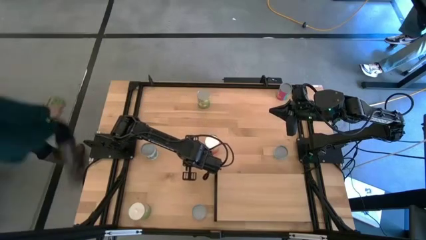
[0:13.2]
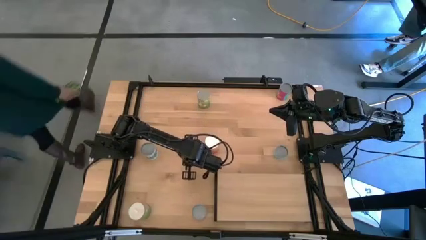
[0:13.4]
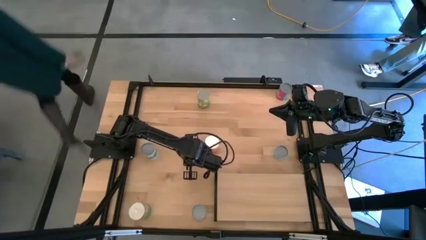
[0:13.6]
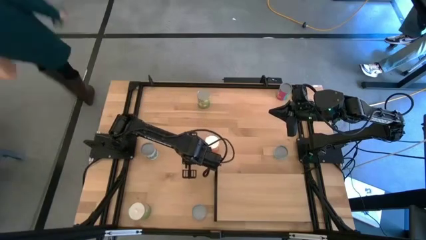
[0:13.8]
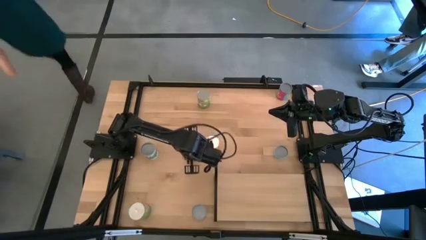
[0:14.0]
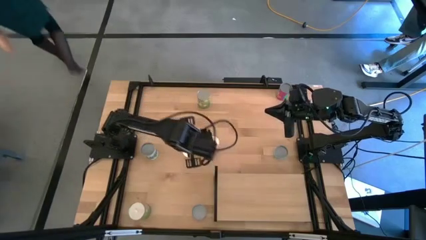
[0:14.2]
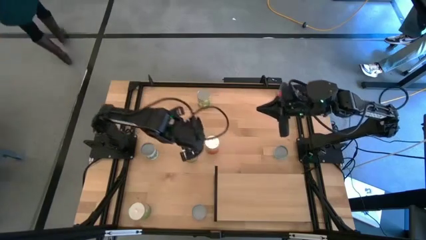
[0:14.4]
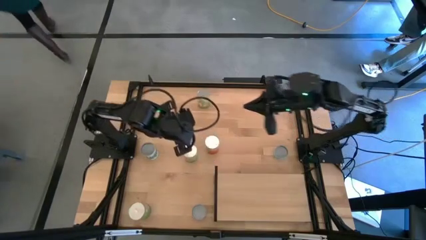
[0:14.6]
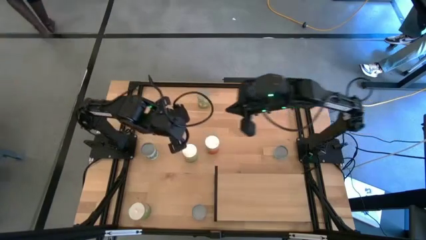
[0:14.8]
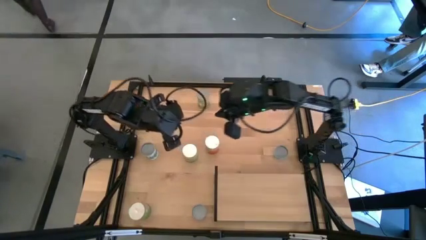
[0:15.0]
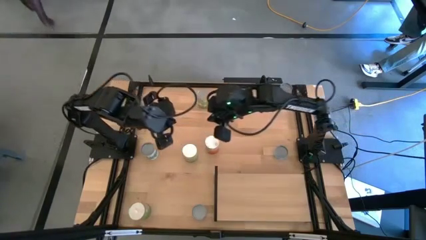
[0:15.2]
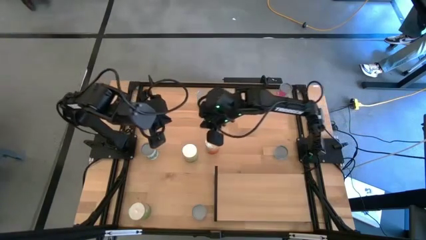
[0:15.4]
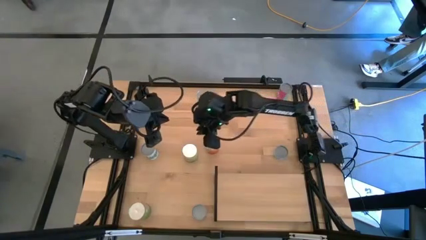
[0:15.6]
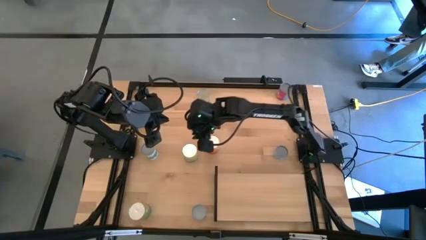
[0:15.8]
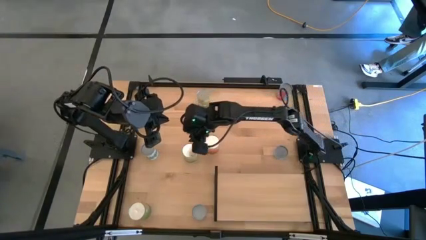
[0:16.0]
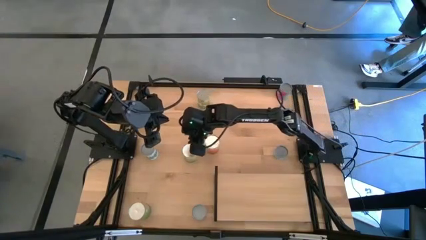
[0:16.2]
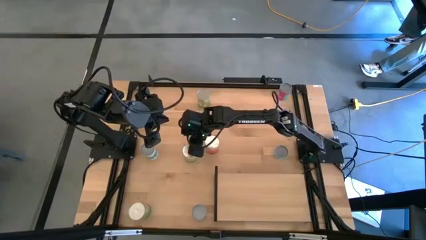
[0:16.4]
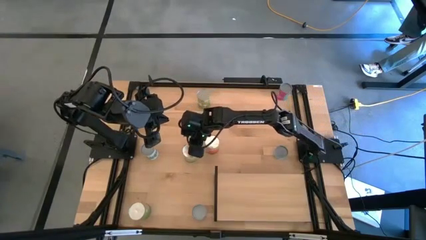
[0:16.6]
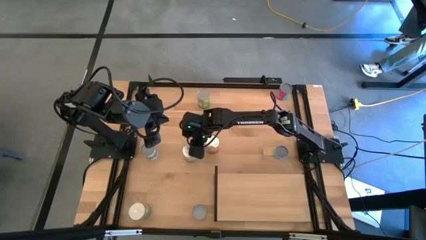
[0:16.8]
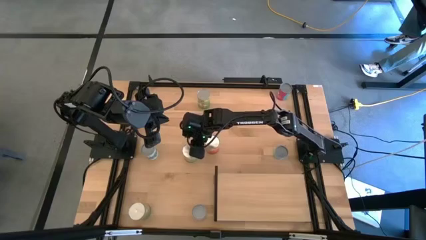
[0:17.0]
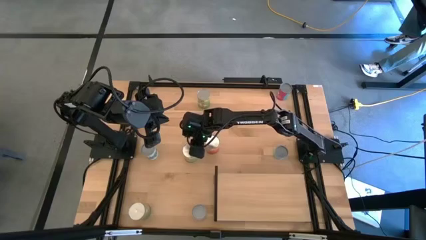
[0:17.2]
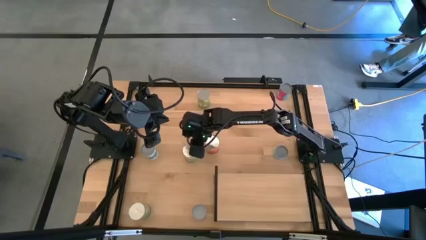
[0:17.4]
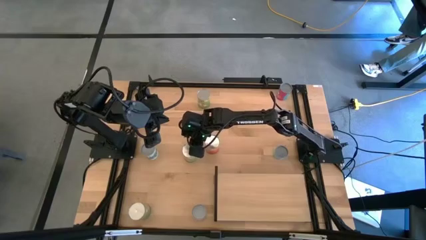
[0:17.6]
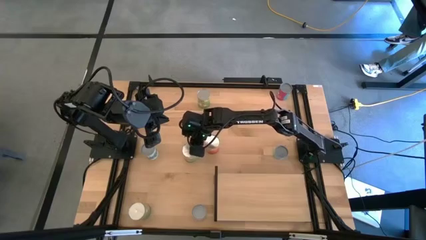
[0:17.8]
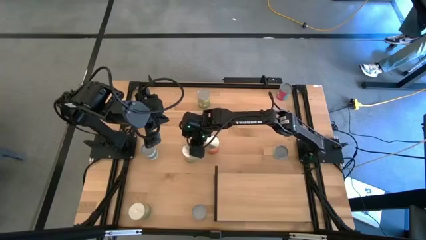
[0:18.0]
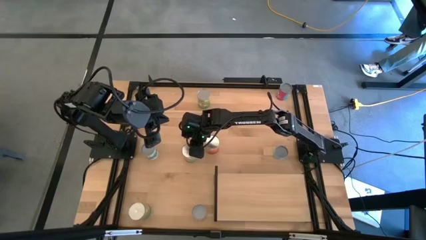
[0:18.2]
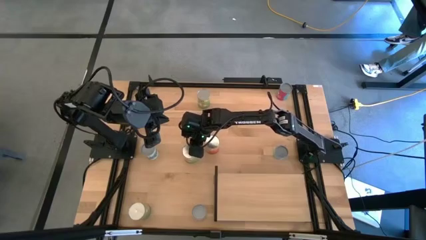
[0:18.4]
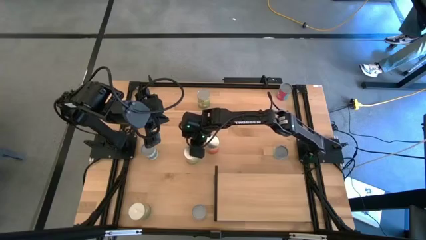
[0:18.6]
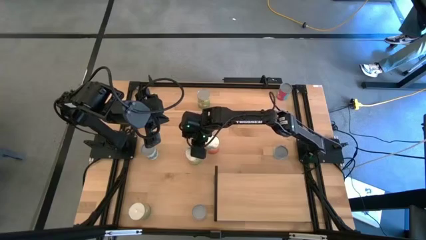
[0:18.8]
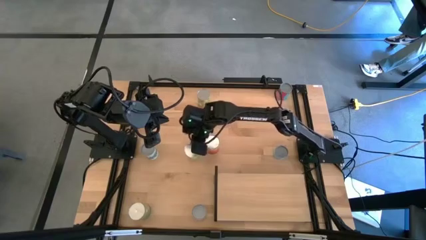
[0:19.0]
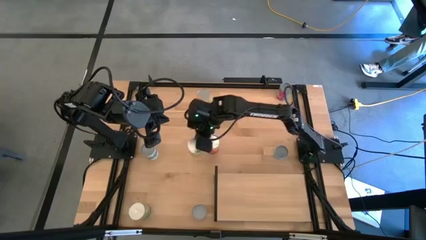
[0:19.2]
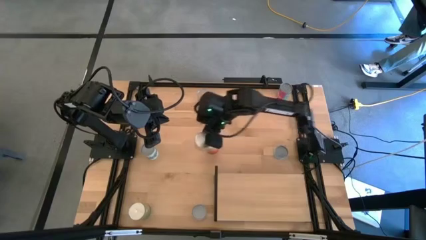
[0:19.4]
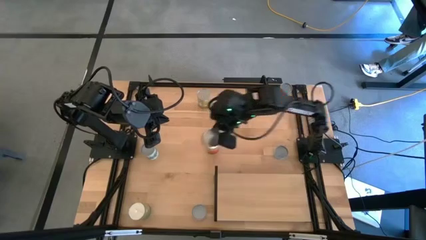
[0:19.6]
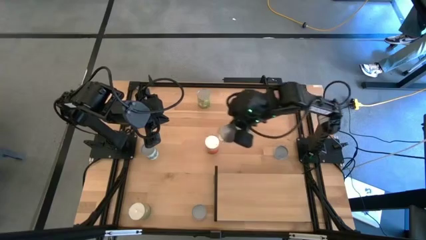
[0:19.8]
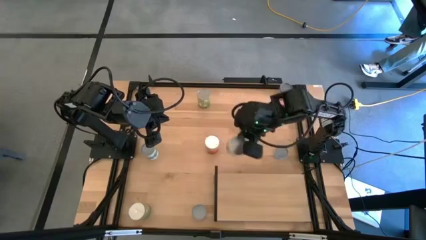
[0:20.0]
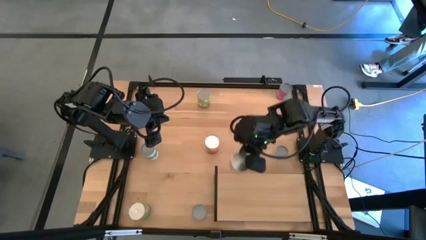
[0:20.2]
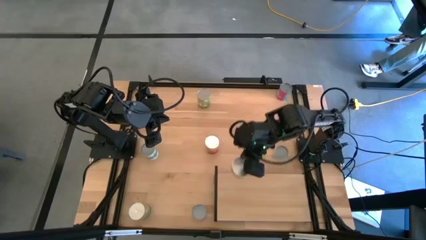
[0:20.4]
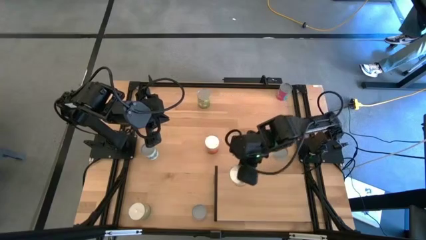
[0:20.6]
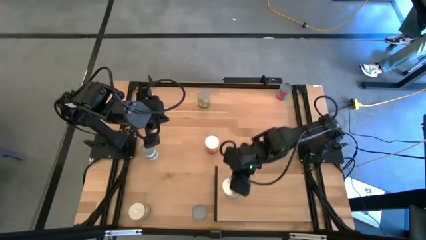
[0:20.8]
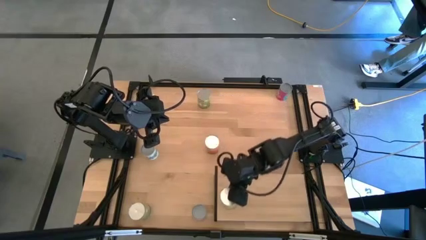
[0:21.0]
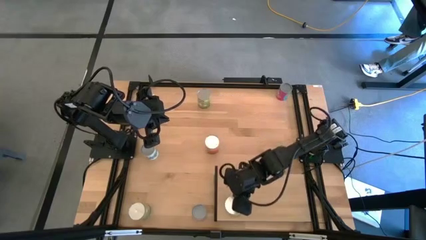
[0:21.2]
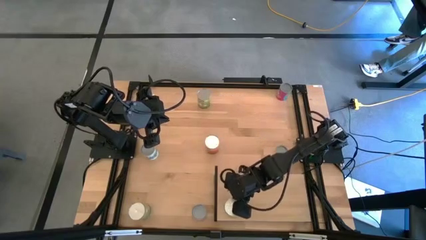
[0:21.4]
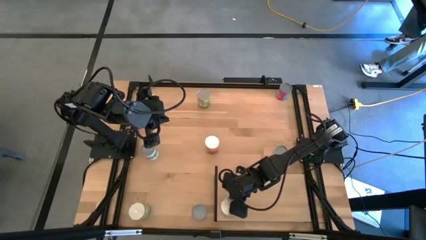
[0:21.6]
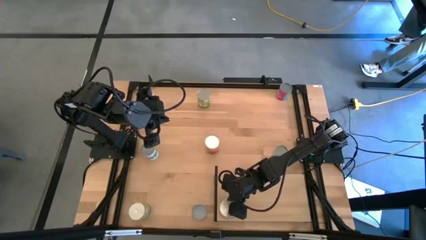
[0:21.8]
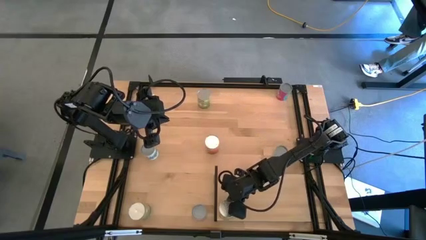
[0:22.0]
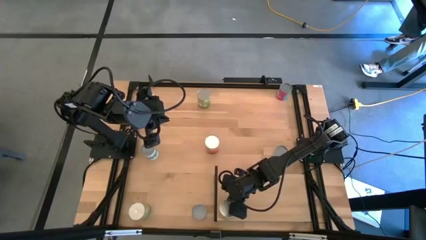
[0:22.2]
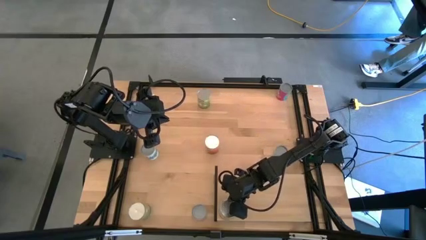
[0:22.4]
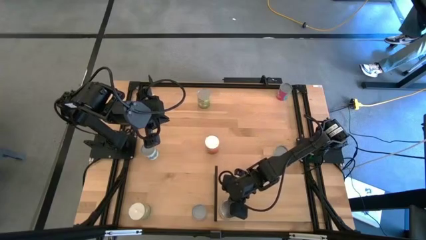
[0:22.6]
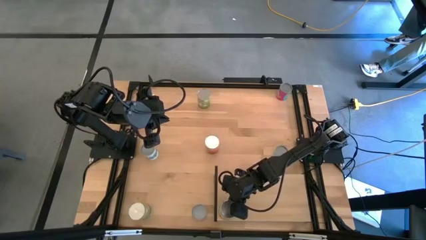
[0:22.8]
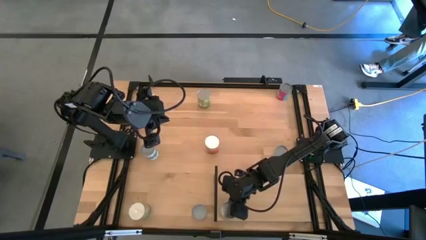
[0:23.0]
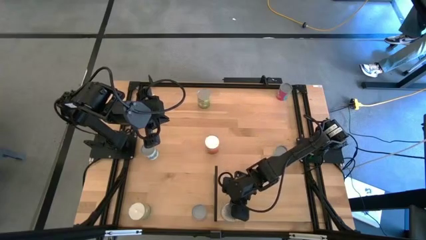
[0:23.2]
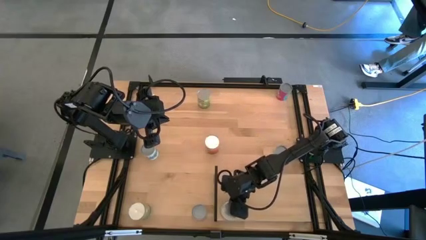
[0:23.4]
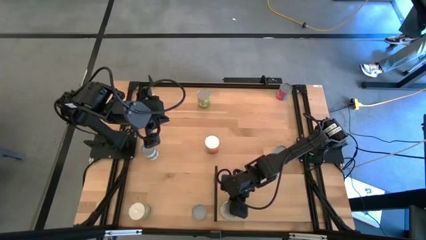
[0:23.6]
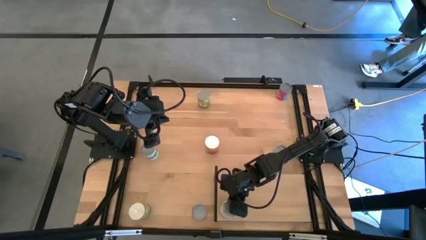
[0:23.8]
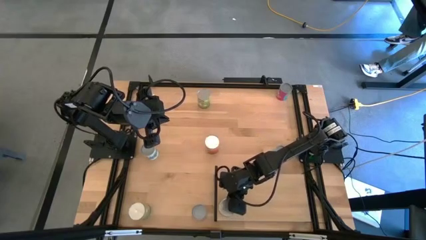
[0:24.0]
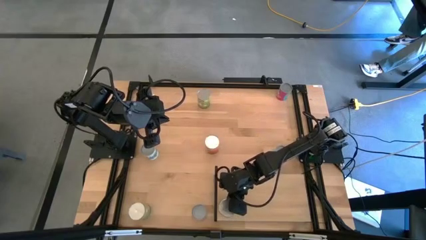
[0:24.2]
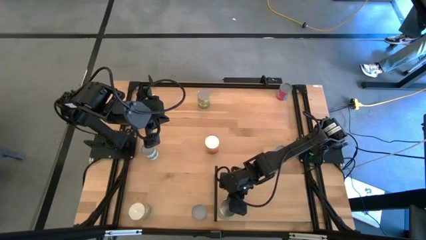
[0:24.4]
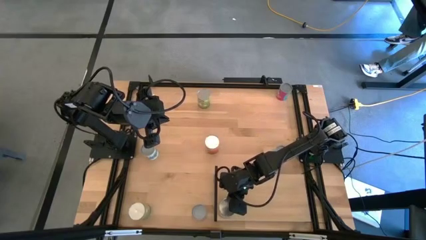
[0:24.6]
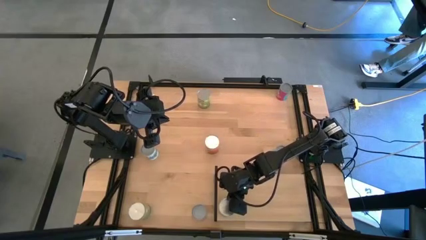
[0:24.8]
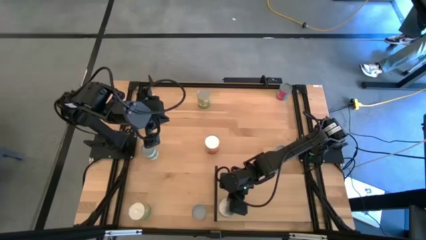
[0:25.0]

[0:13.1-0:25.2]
Task: Pick and place cans onto a shelf
Put the left canned pears on the shelf
